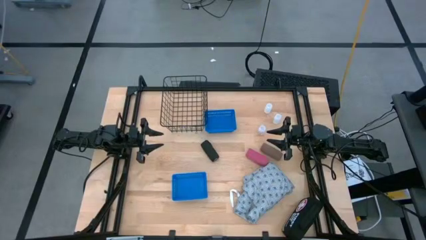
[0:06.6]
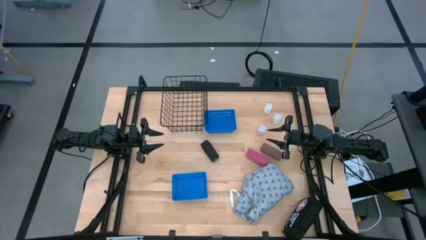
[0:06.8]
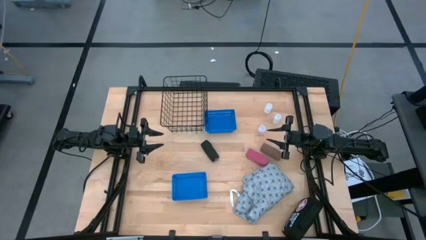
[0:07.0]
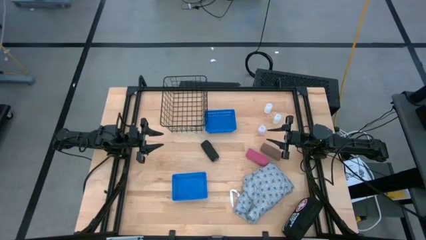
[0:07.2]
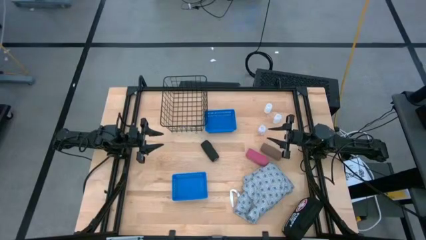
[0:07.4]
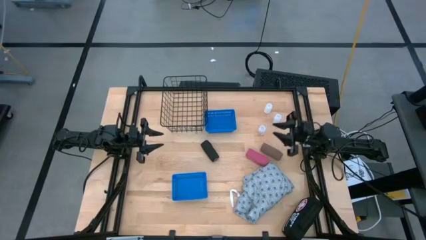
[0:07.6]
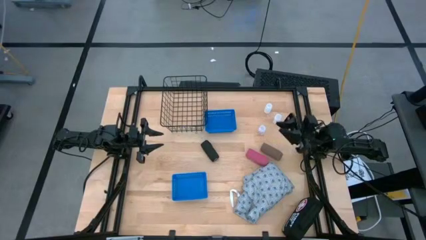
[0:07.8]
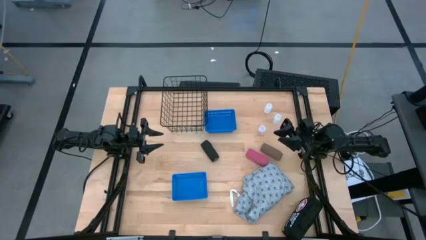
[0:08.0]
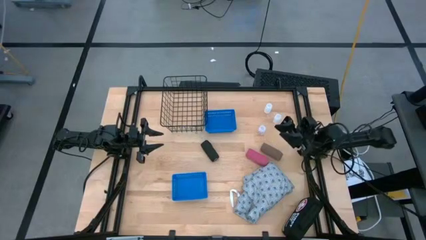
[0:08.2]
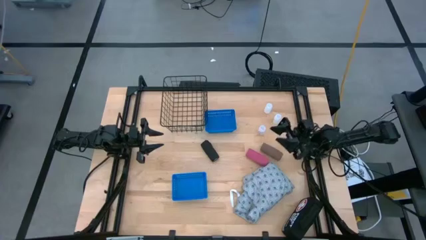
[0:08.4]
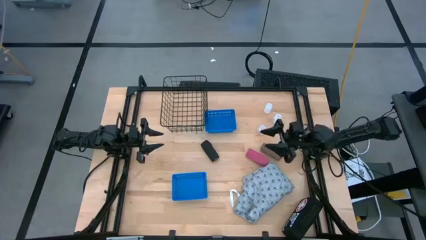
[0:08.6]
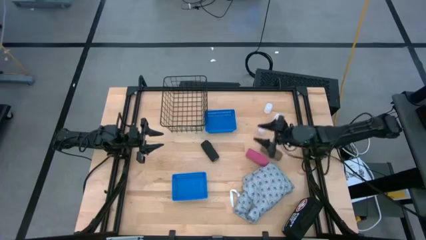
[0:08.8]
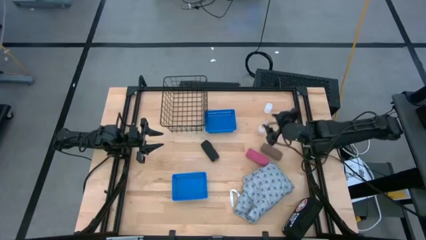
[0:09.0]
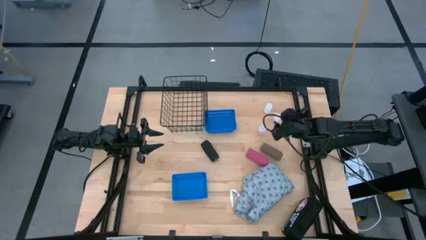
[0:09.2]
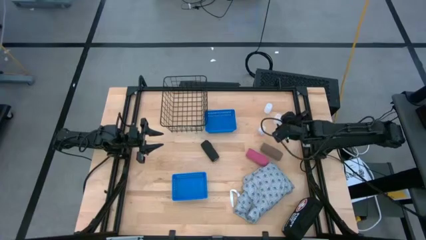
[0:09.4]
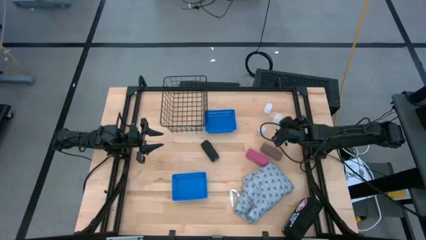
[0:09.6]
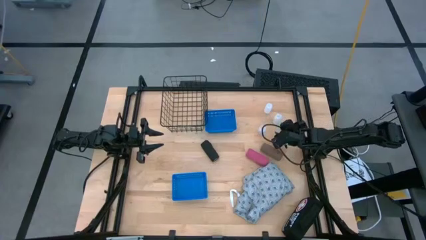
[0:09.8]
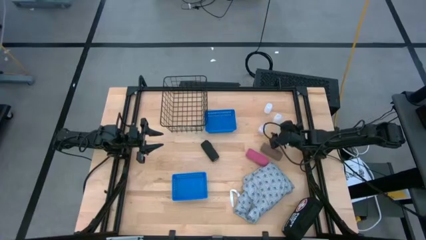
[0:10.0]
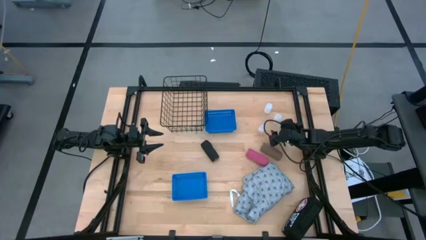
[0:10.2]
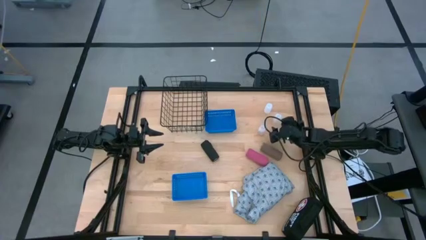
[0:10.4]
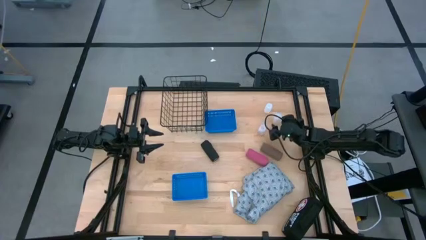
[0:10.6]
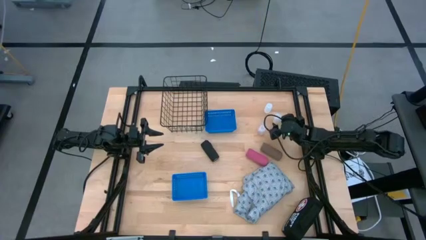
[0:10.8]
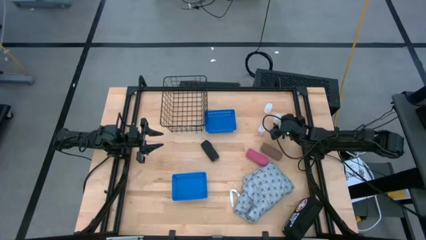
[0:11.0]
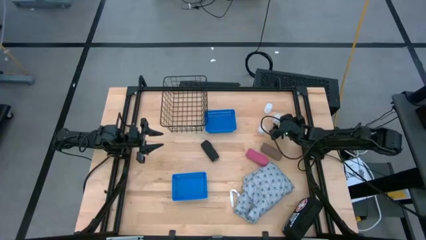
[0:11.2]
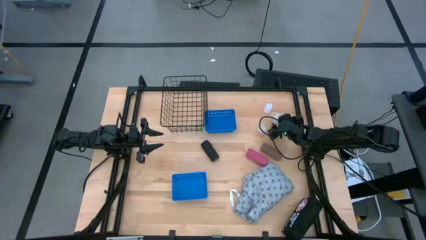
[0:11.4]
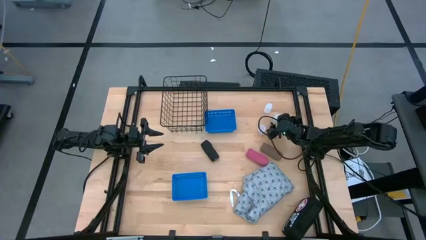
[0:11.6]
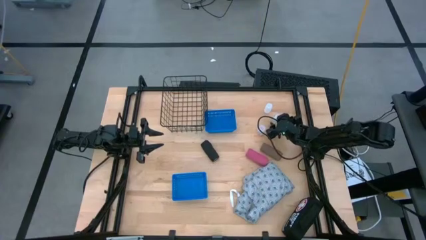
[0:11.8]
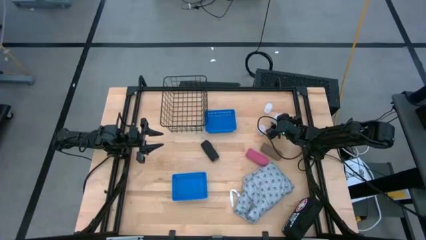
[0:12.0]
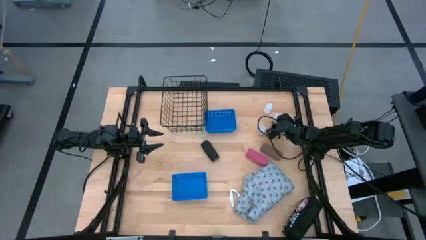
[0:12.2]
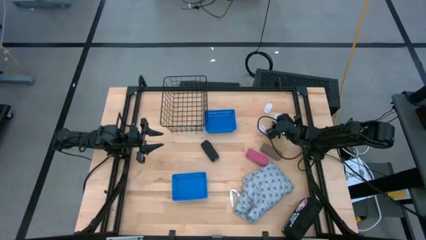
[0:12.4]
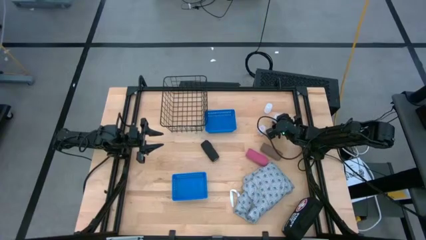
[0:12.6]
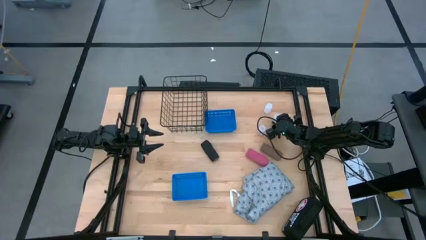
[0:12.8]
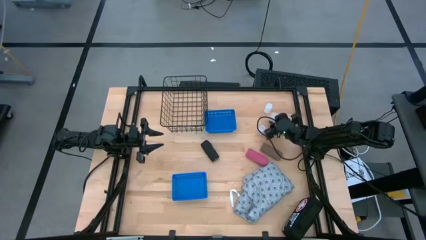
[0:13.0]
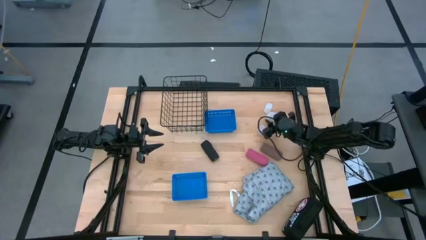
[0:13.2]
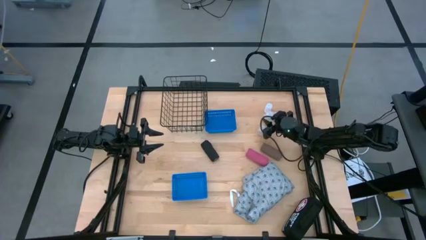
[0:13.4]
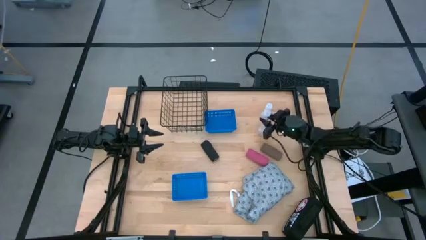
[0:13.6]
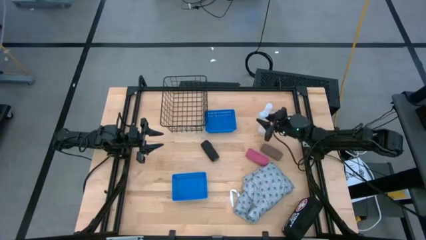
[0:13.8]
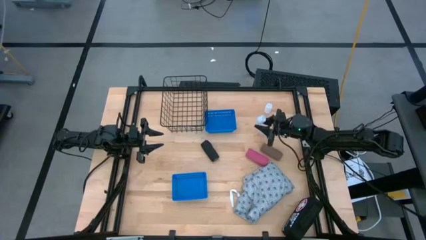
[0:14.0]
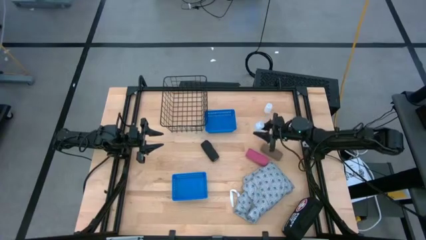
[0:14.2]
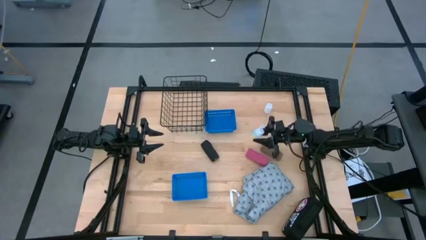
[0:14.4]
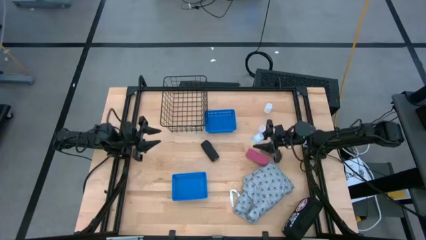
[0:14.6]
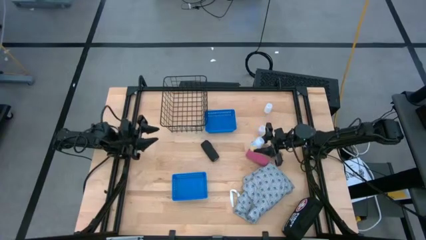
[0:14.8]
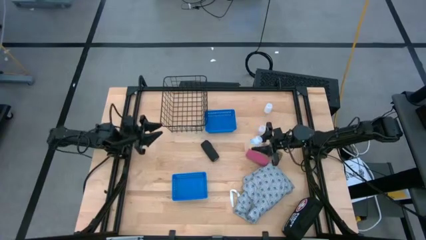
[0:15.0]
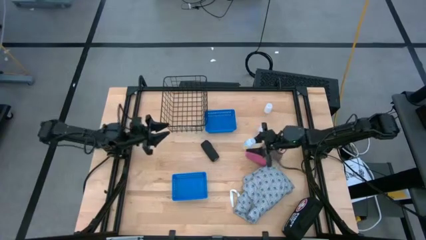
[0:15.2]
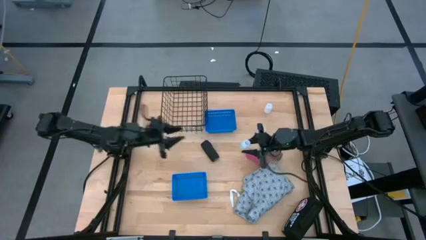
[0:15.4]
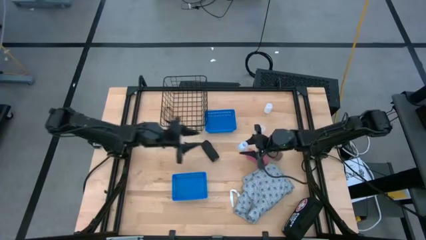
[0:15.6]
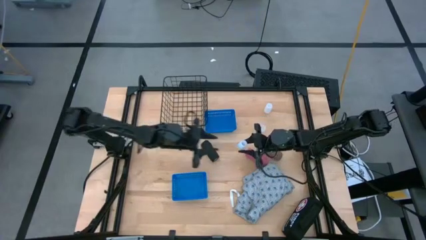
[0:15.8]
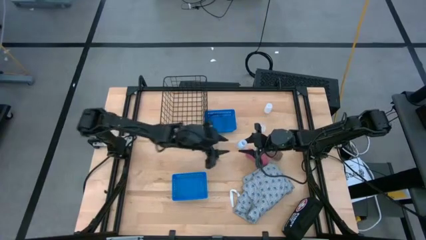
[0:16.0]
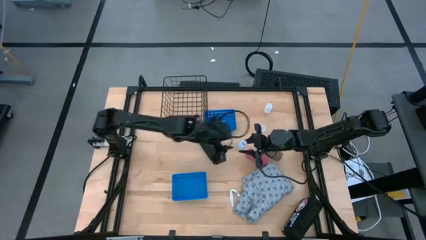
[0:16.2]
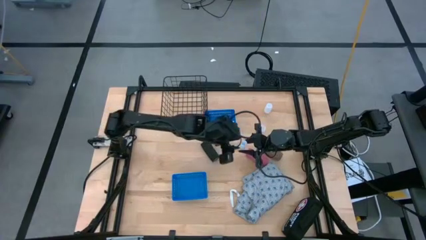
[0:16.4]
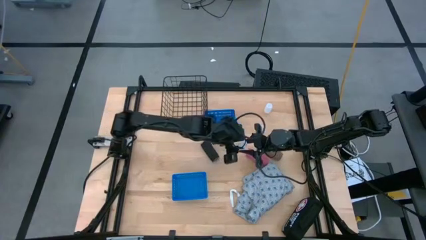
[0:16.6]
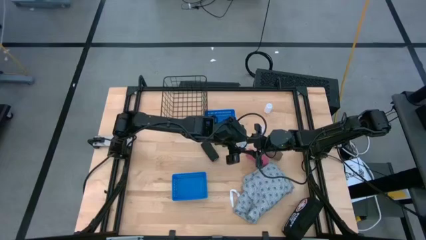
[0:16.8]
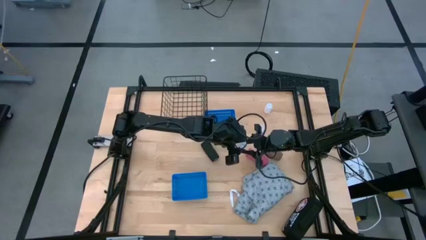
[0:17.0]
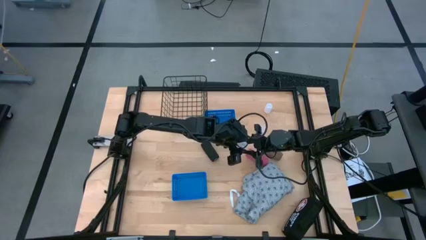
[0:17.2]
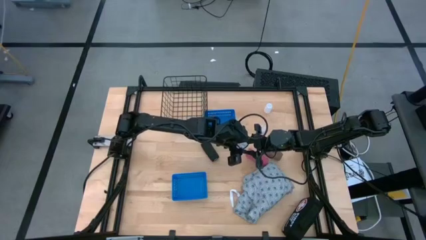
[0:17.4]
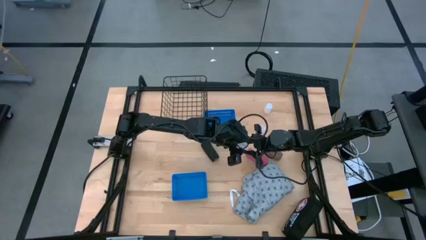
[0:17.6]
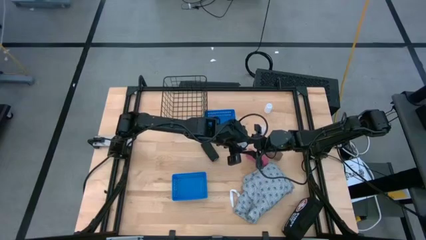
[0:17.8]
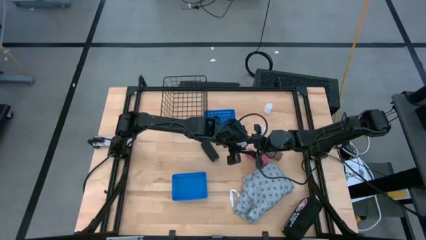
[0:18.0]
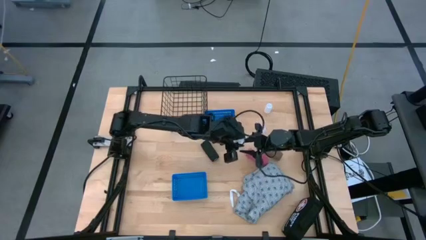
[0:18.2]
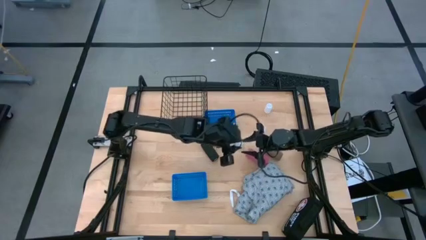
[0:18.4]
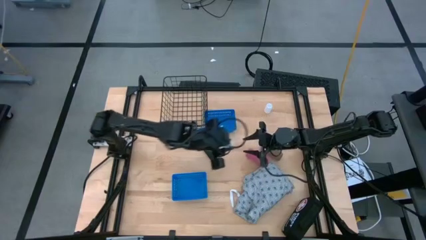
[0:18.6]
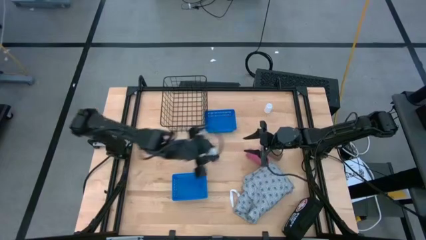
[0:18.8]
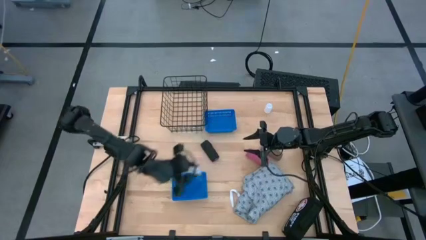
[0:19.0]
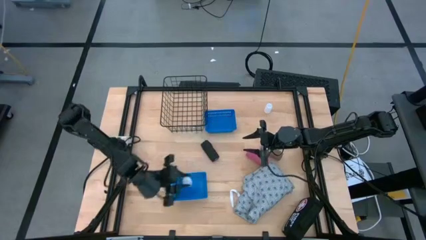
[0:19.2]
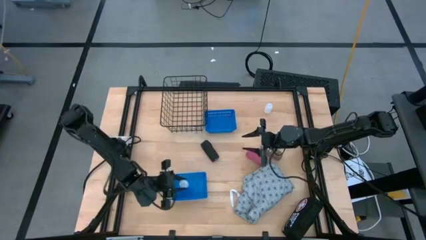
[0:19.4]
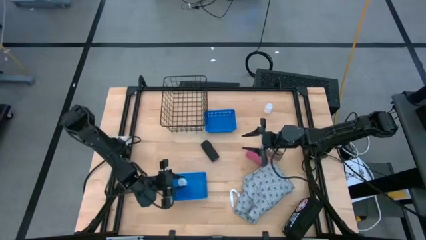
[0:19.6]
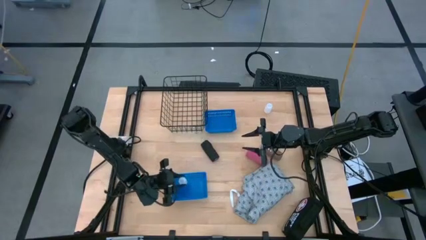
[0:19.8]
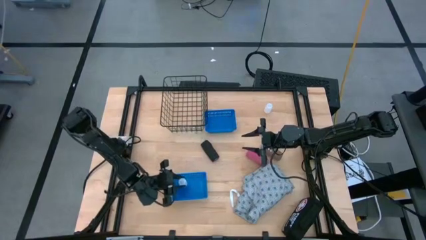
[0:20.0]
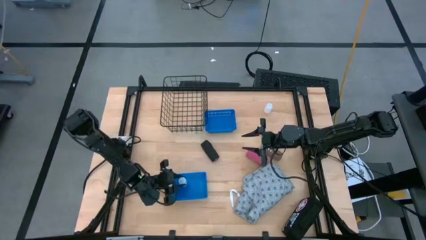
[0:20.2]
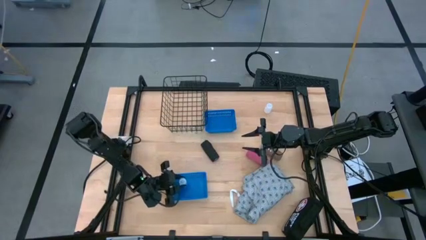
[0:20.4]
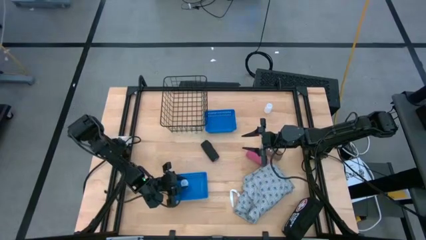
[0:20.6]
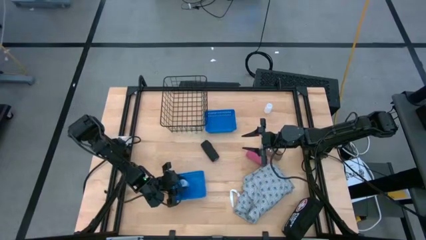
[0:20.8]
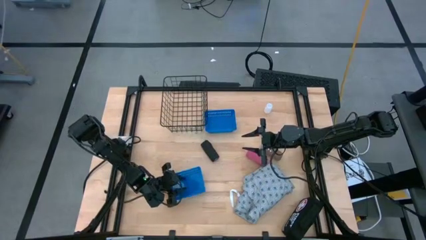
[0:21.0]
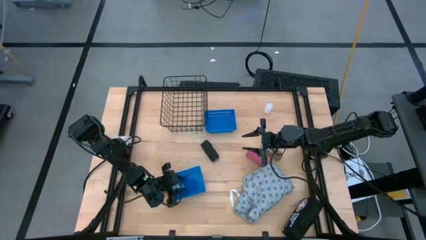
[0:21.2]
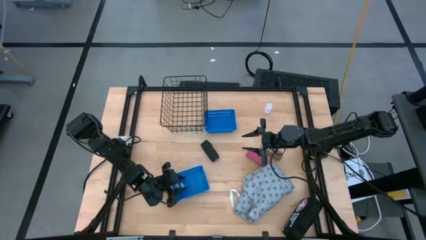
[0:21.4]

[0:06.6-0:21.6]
Task: Pick & Place Medicine items
Put the middle white medicine bottle into the bottom blue basket

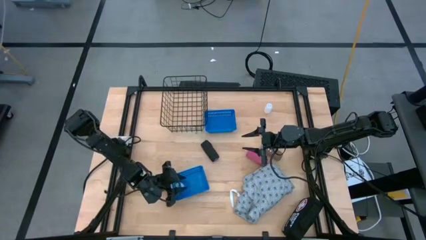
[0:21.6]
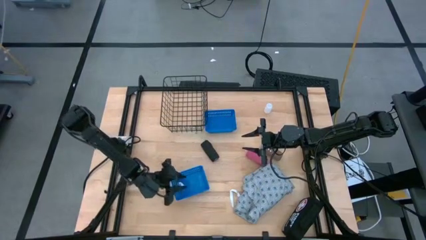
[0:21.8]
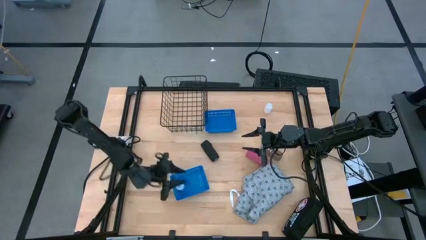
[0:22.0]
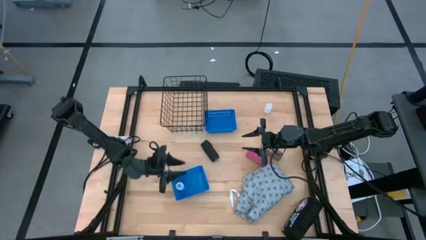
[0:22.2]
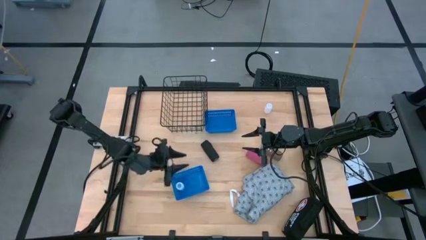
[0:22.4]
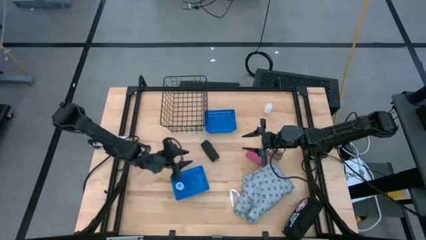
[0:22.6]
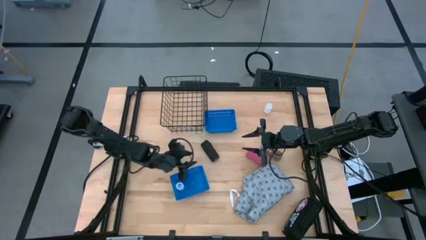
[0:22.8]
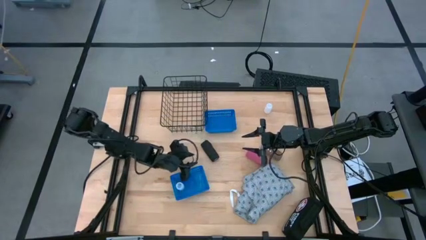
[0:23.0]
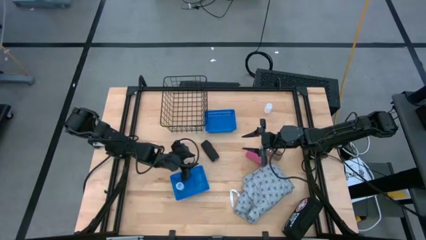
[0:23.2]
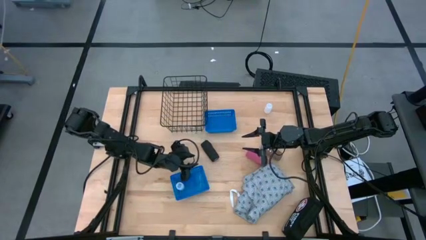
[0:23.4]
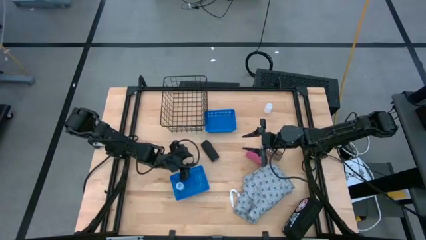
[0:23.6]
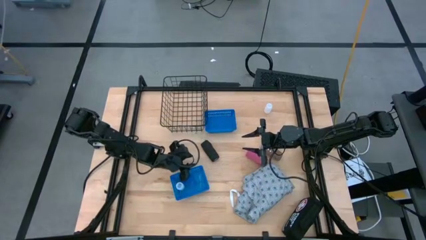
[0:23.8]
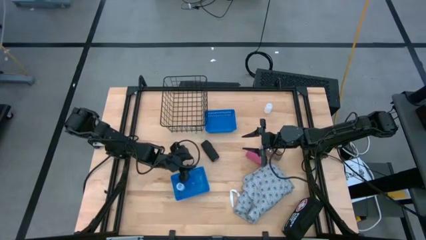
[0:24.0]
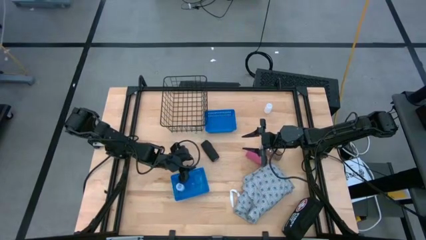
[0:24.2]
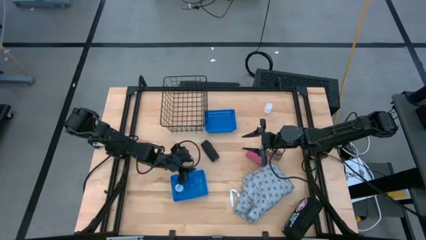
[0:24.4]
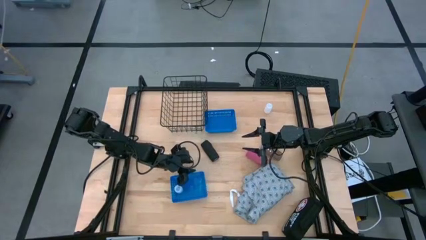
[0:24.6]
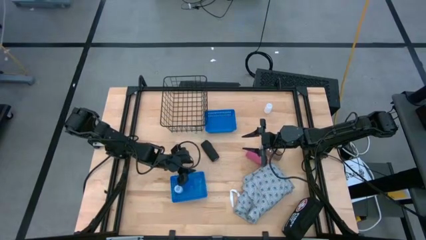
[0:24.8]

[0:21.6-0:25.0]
Adjust the bottom blue basket
